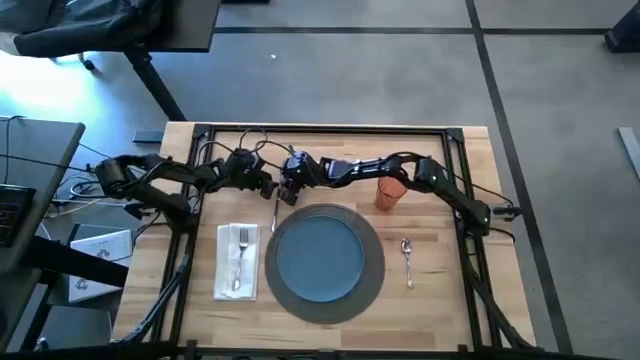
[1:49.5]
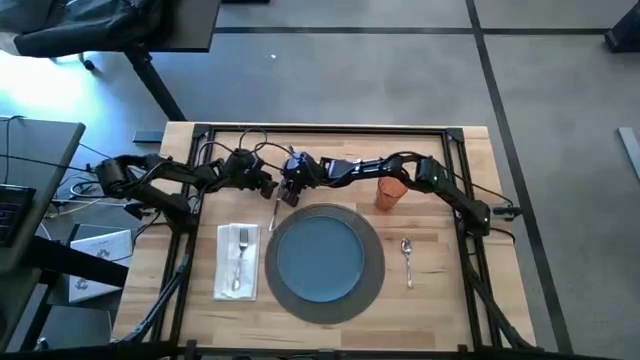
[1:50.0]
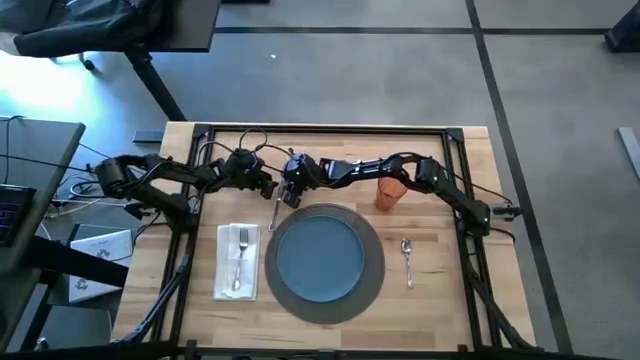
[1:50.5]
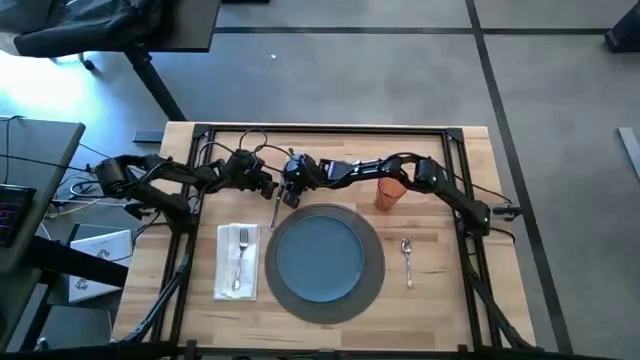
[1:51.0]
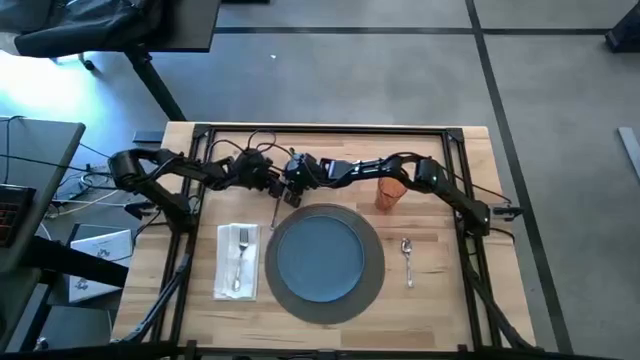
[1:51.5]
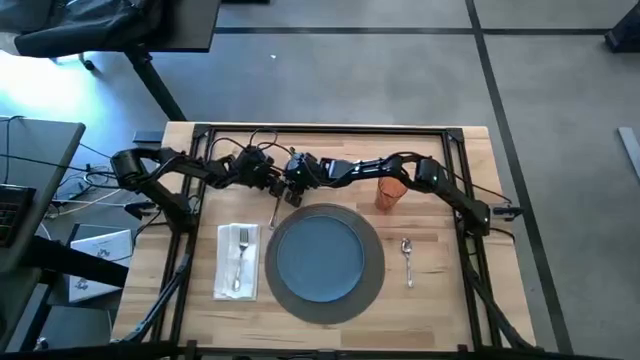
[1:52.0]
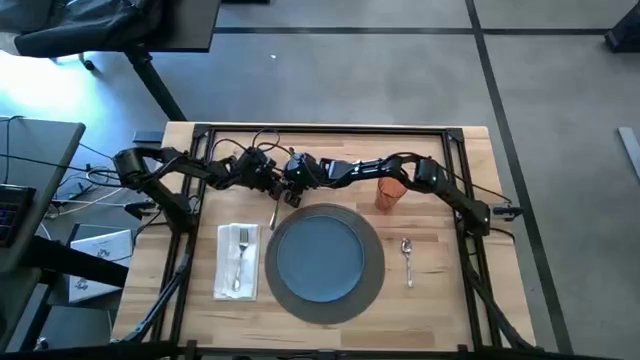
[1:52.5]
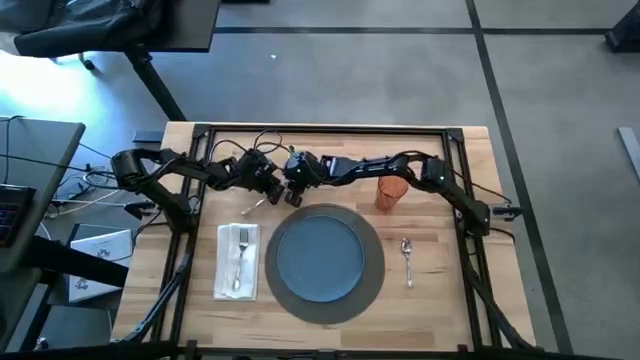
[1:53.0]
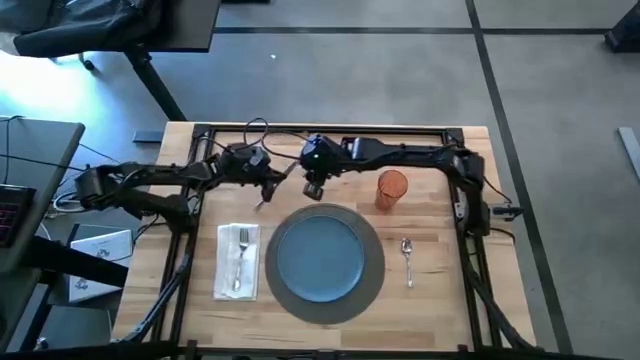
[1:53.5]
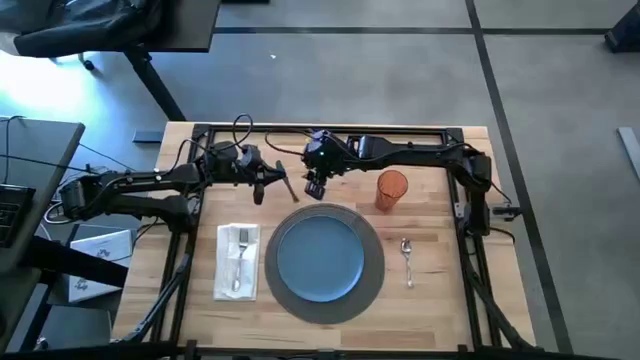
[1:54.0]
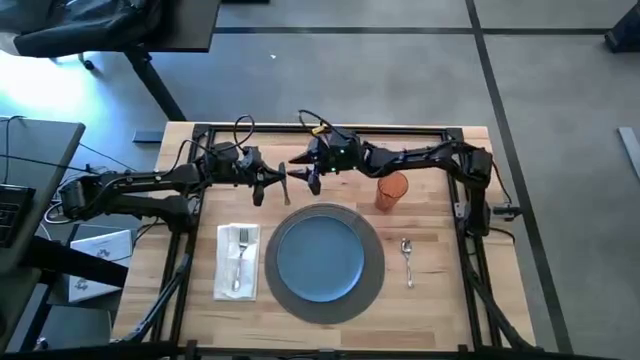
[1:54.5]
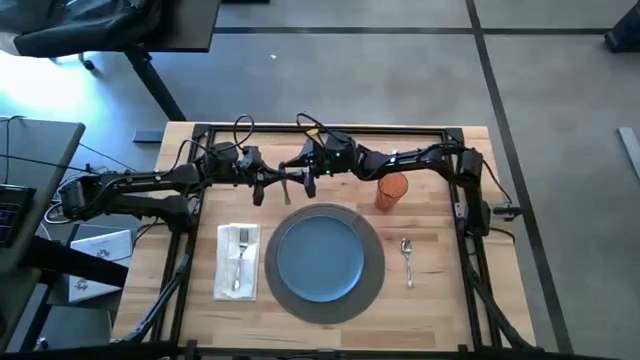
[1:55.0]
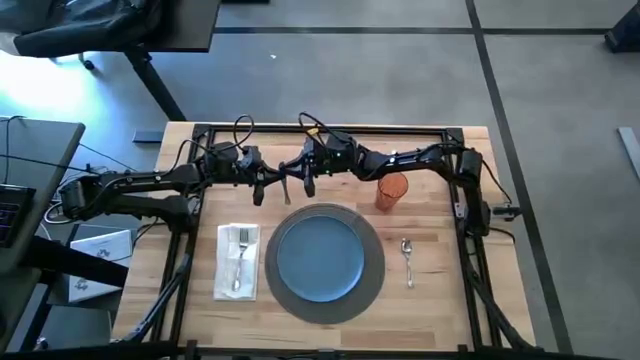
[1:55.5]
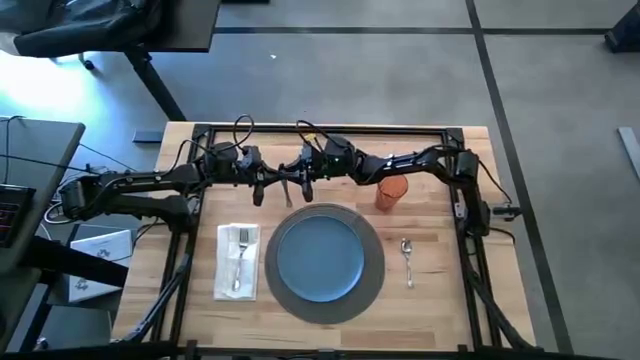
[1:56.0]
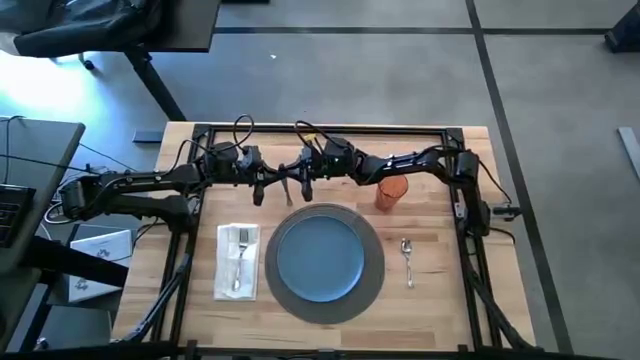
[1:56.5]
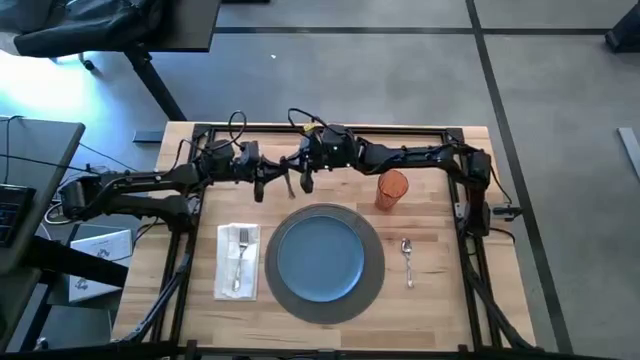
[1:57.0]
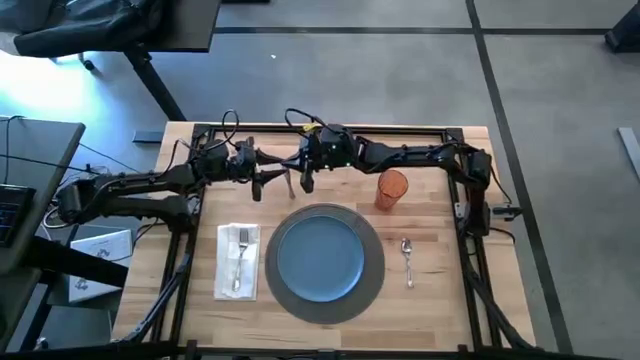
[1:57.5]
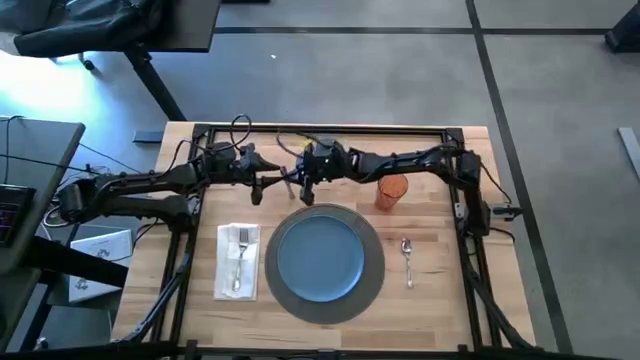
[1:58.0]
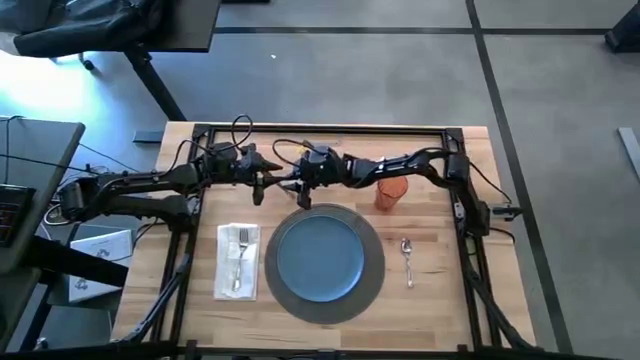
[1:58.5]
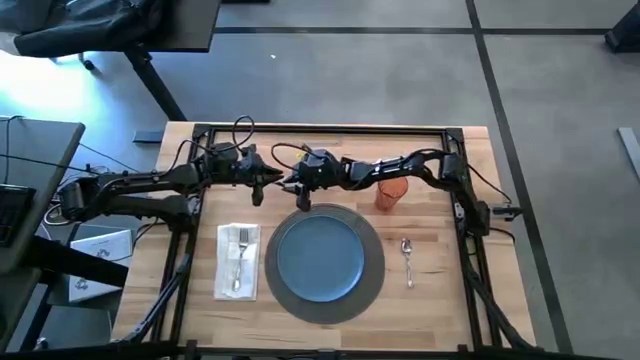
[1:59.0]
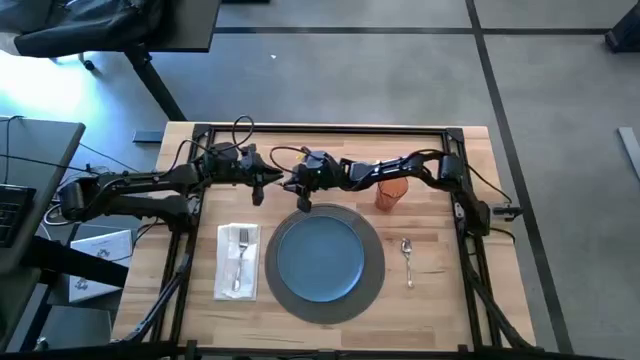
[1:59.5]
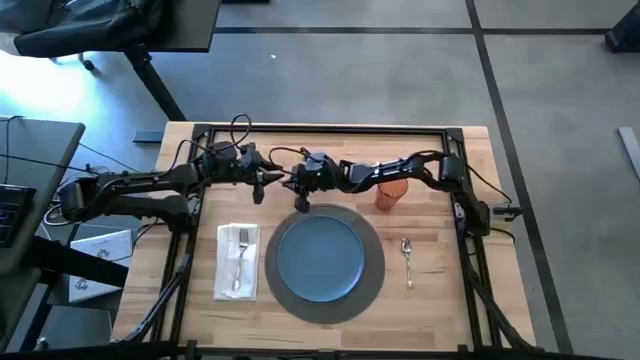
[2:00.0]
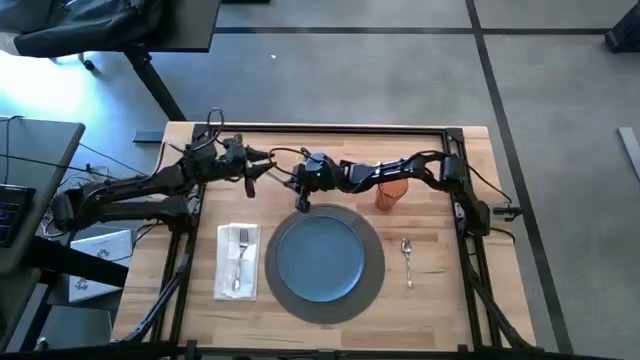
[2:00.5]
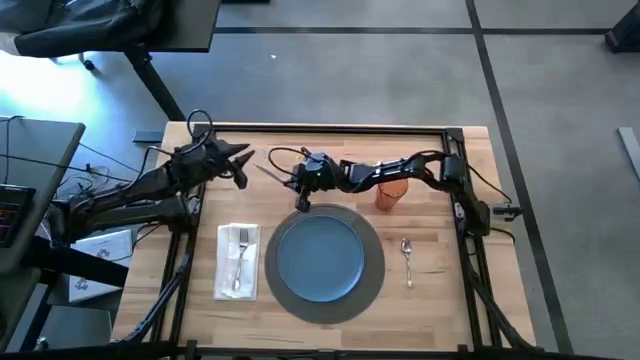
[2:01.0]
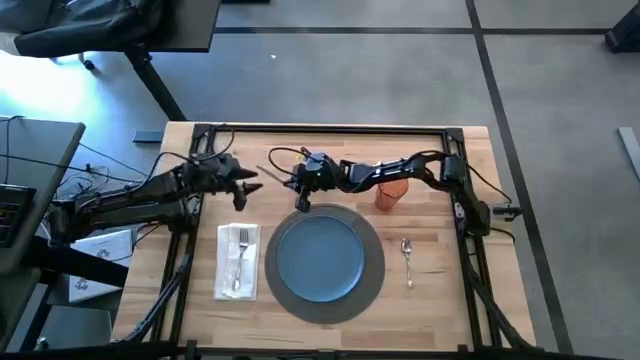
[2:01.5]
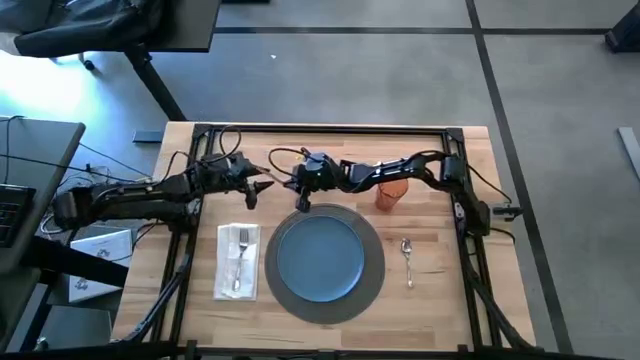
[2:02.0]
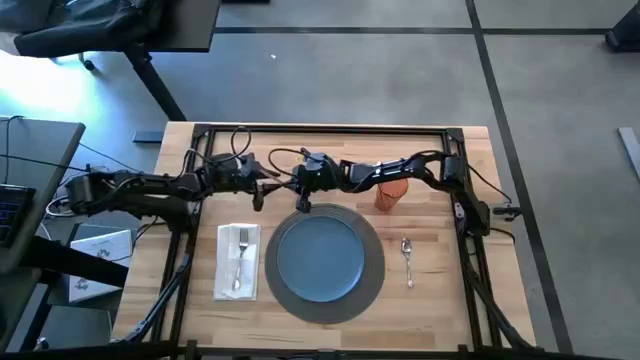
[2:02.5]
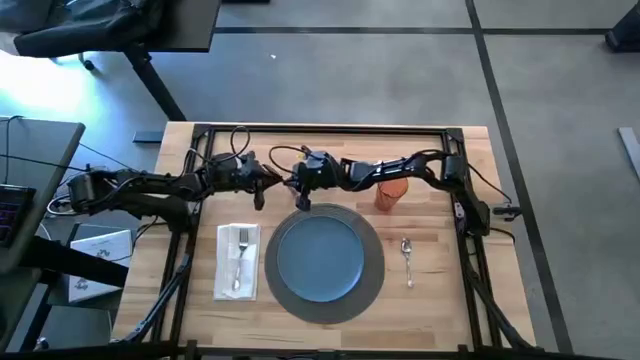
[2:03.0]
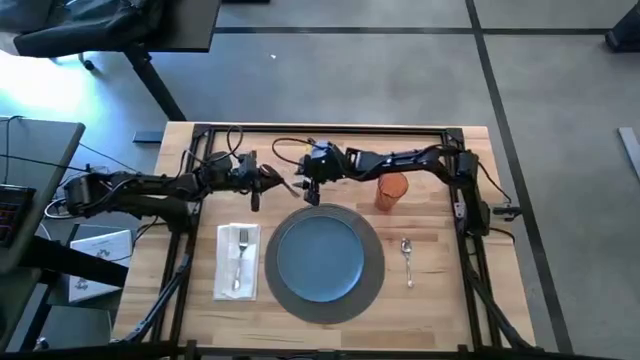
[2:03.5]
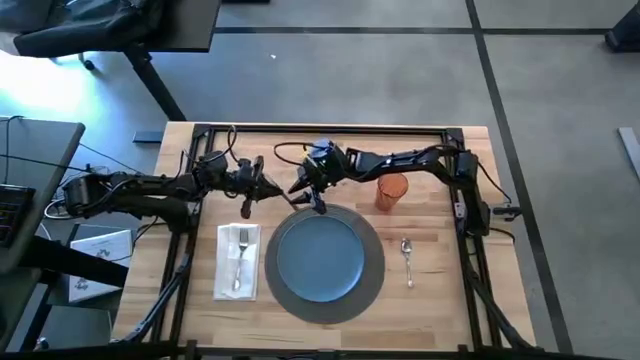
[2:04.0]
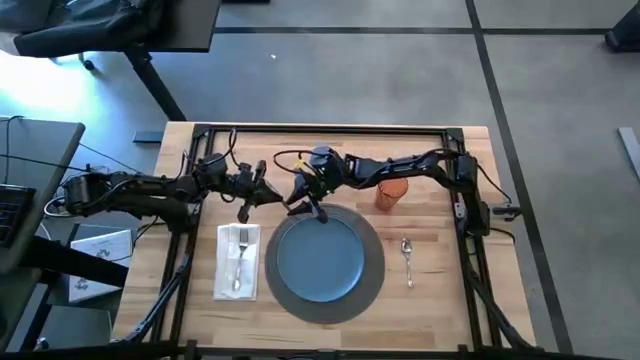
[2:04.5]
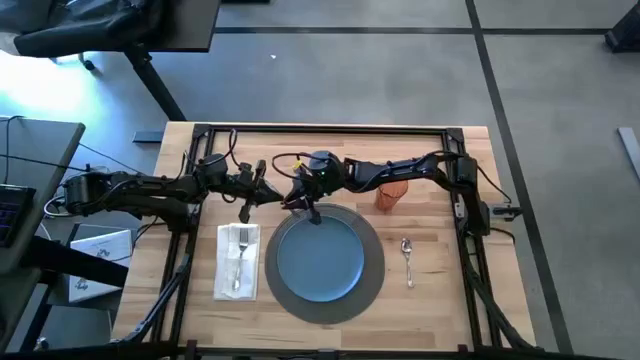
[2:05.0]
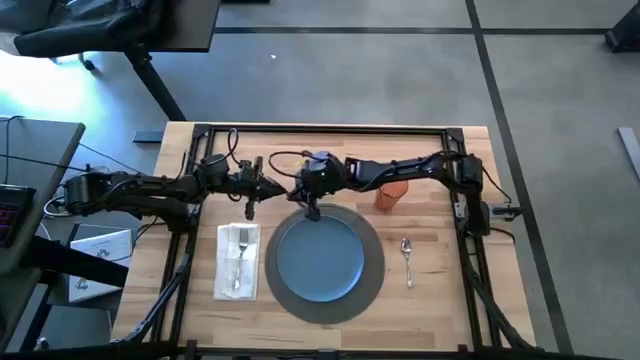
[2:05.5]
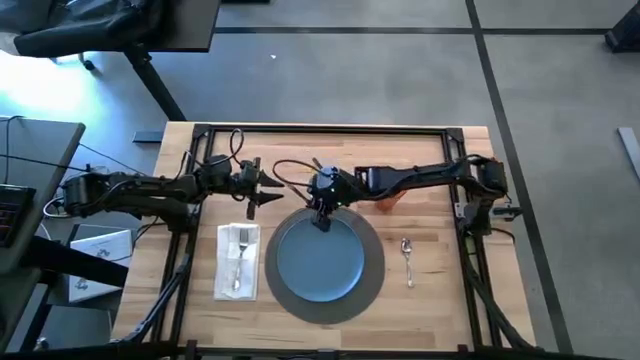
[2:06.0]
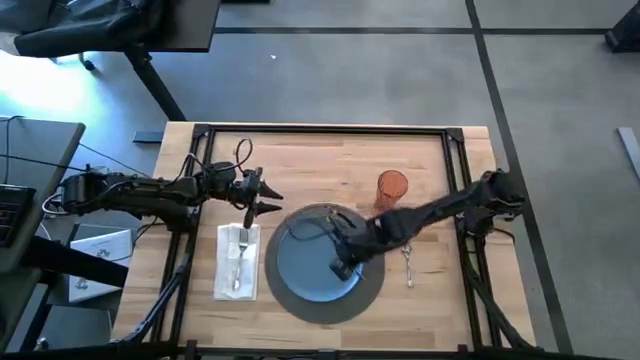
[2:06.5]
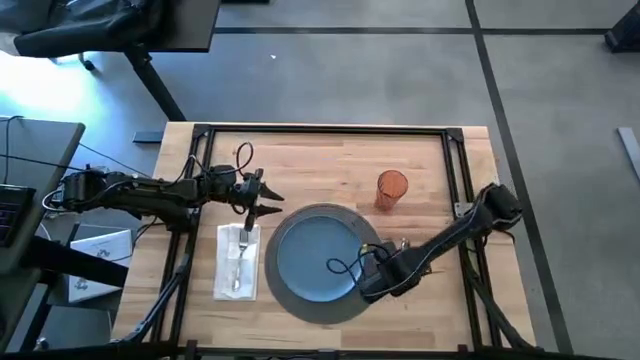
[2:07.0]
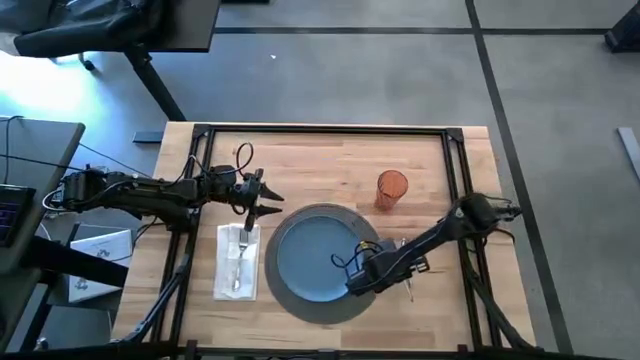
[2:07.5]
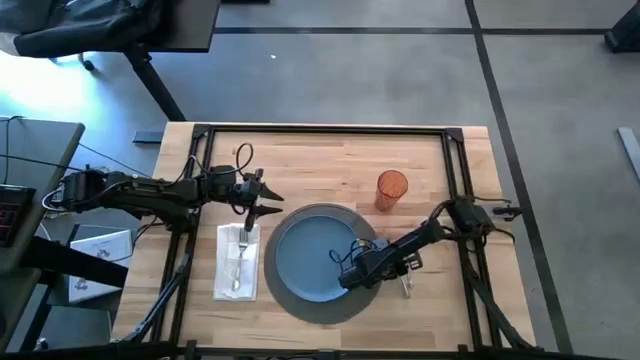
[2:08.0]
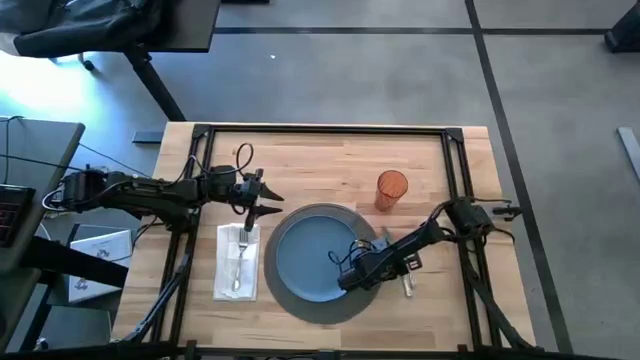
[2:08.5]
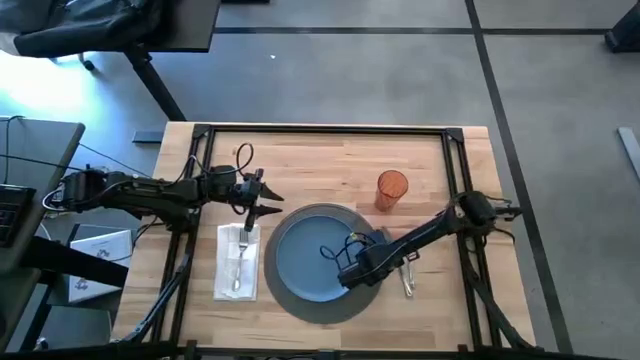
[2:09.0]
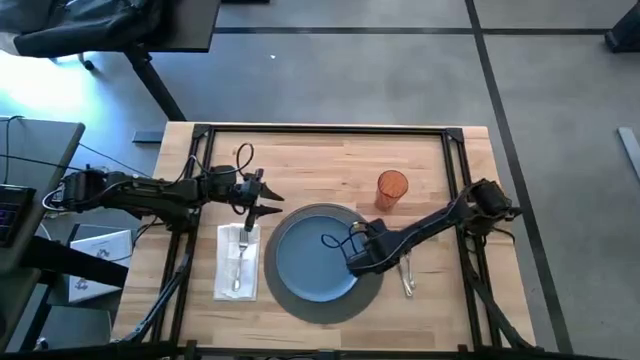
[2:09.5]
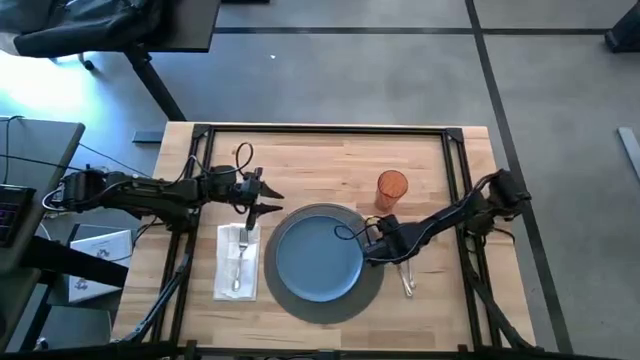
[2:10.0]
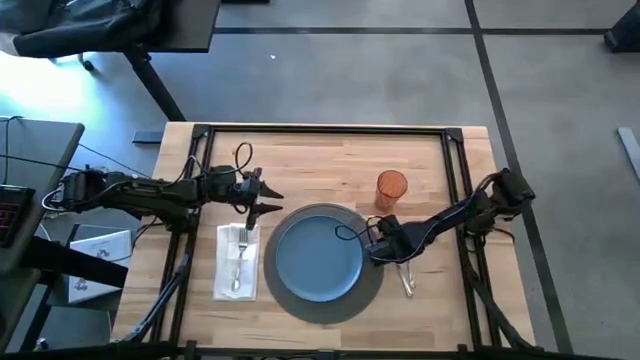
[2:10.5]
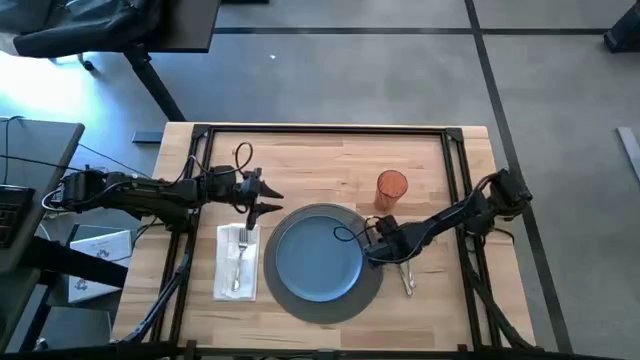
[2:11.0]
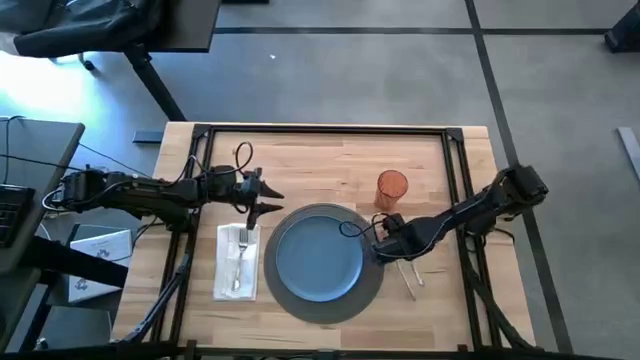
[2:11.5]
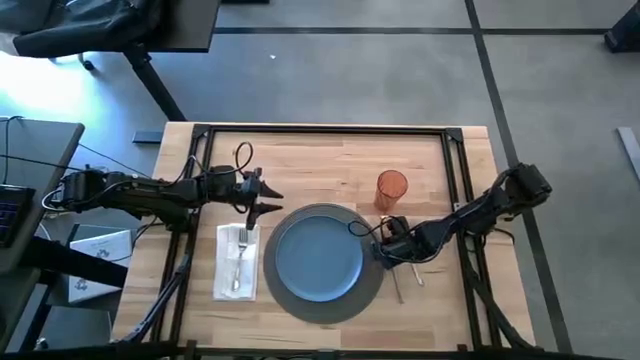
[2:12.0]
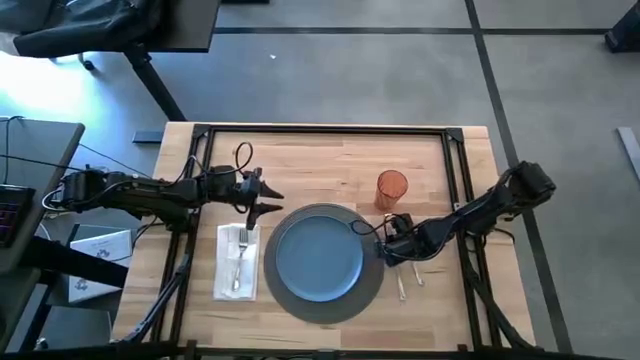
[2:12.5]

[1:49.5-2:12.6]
Task: Set table place
Put the silver table knife to the right of the gray table mat
